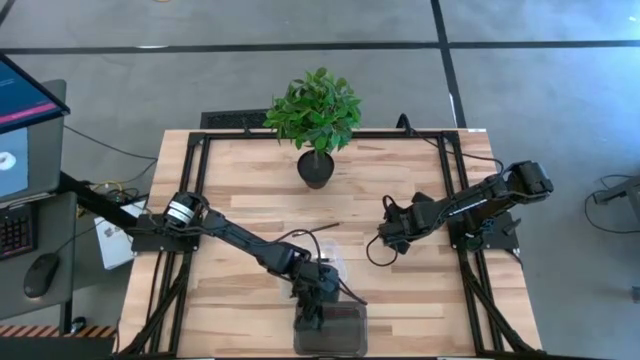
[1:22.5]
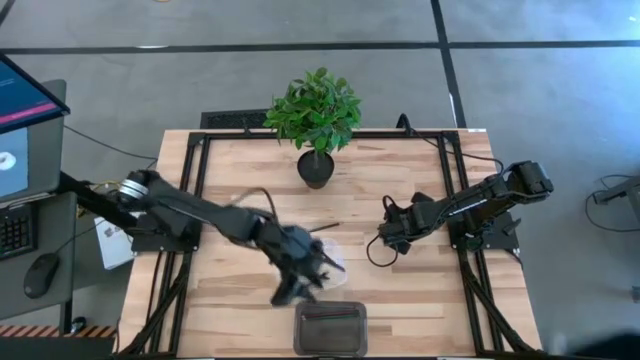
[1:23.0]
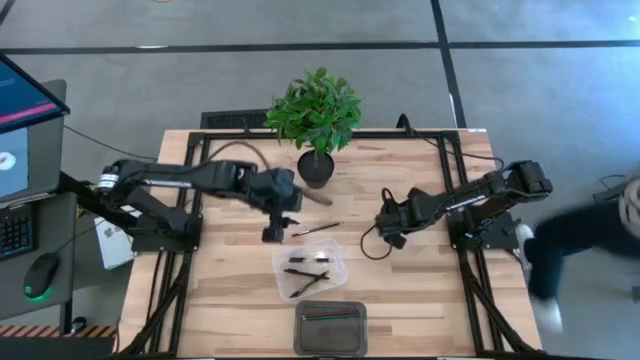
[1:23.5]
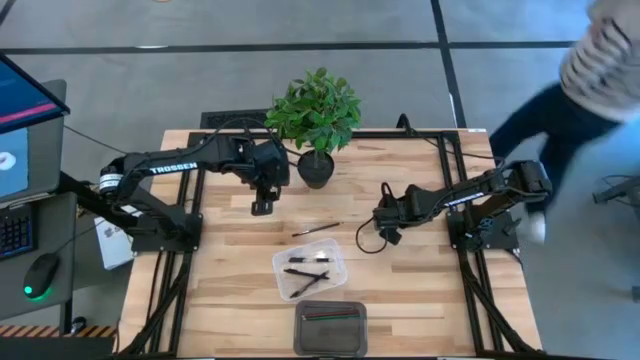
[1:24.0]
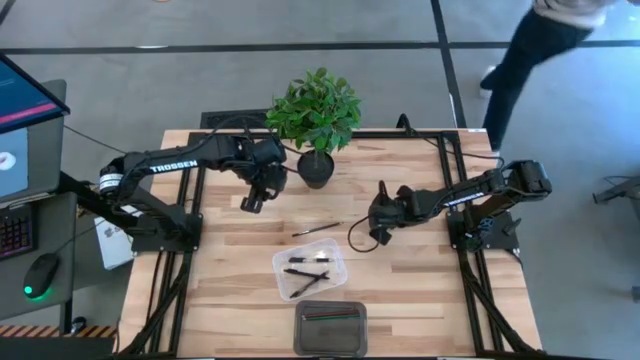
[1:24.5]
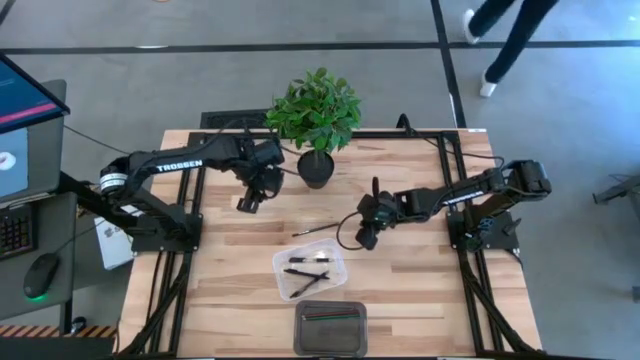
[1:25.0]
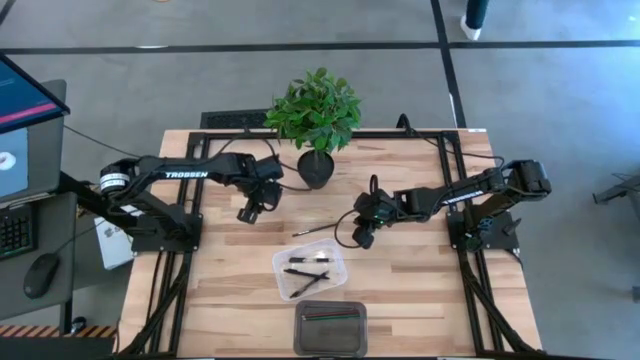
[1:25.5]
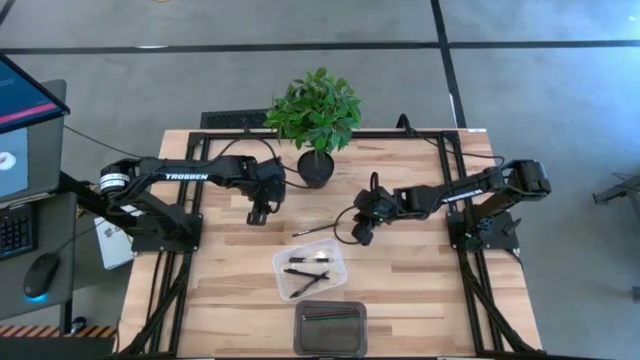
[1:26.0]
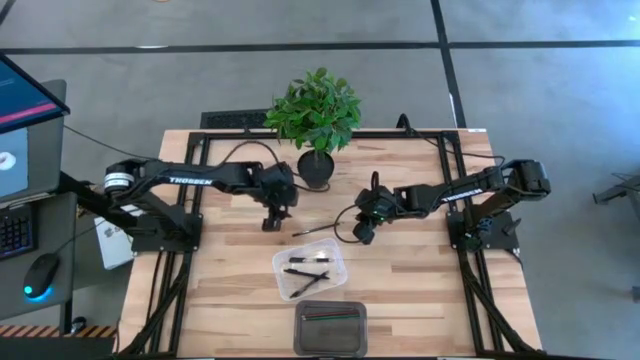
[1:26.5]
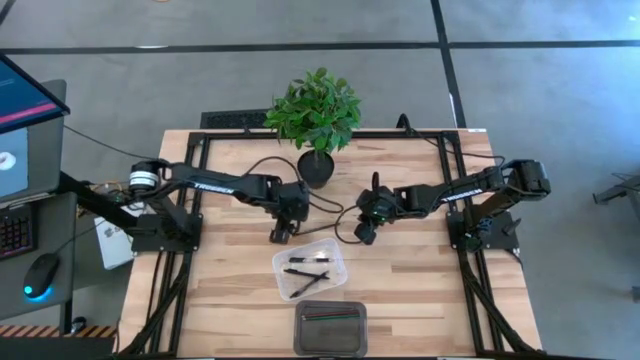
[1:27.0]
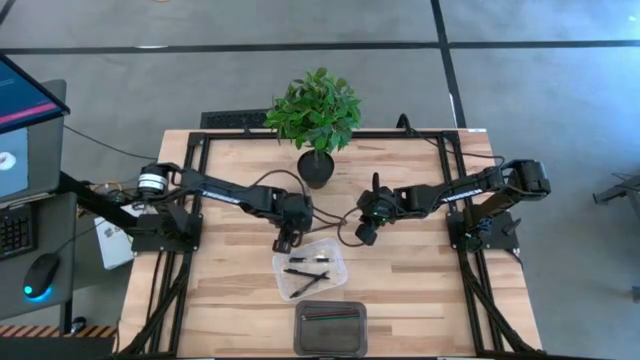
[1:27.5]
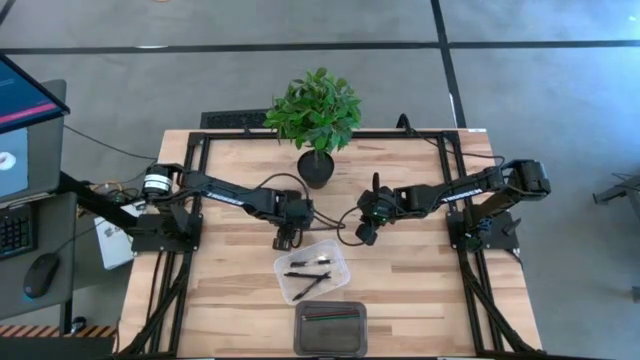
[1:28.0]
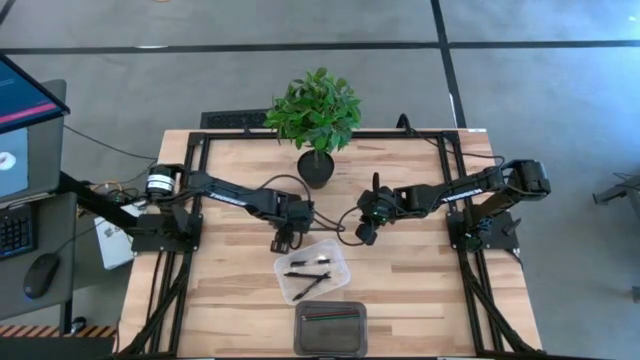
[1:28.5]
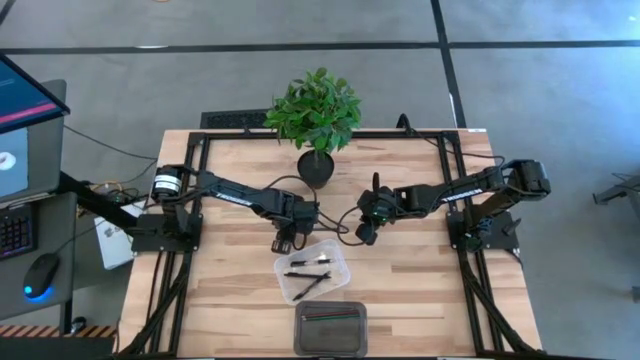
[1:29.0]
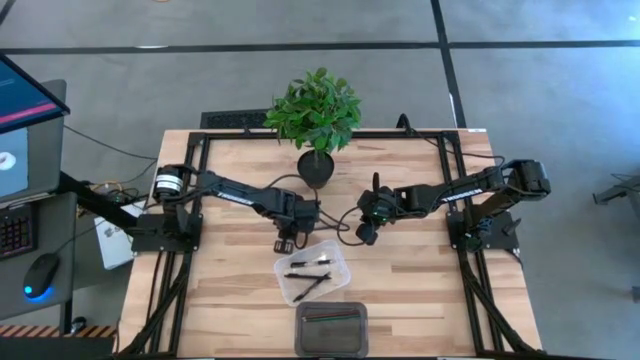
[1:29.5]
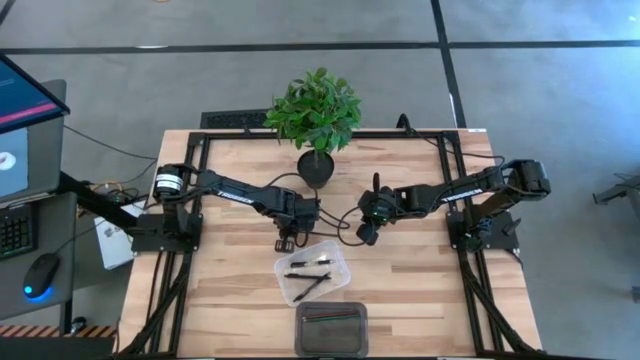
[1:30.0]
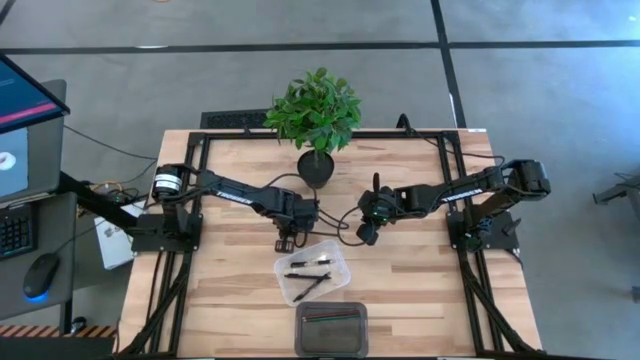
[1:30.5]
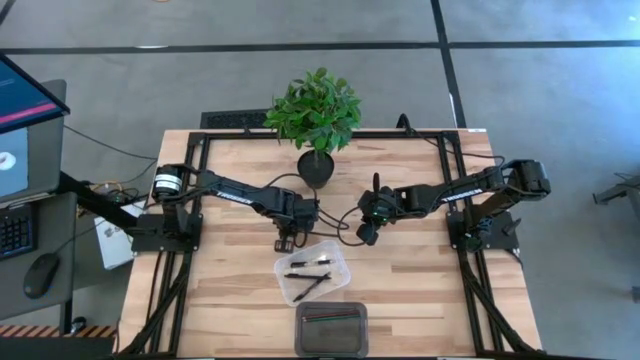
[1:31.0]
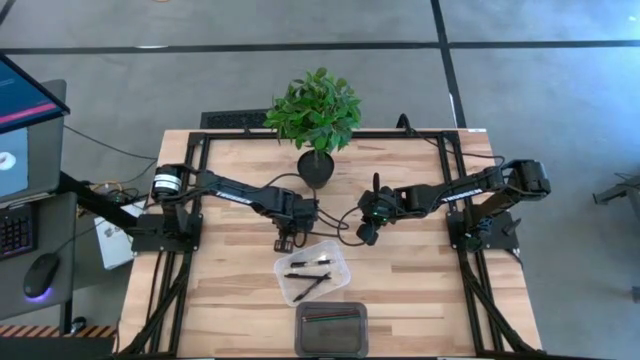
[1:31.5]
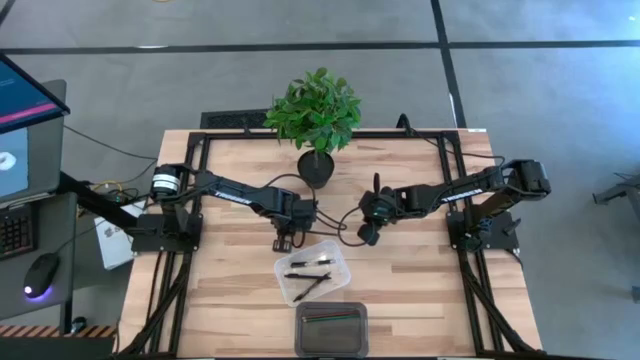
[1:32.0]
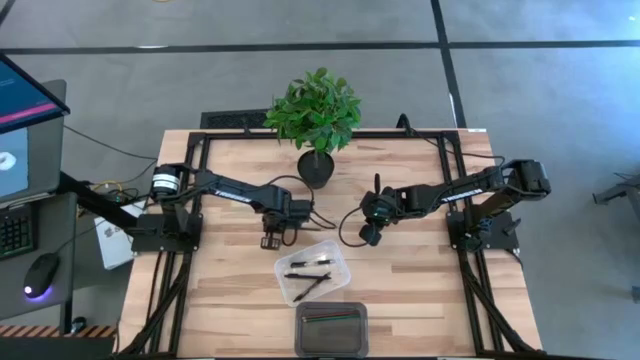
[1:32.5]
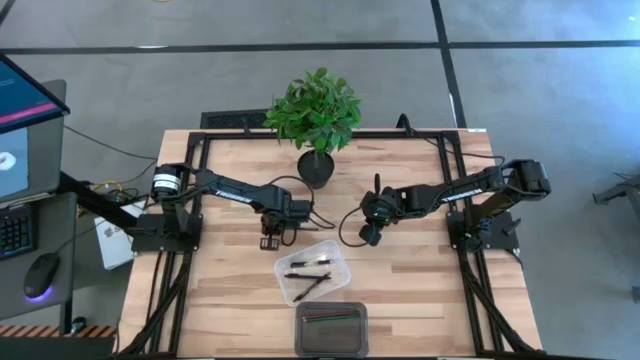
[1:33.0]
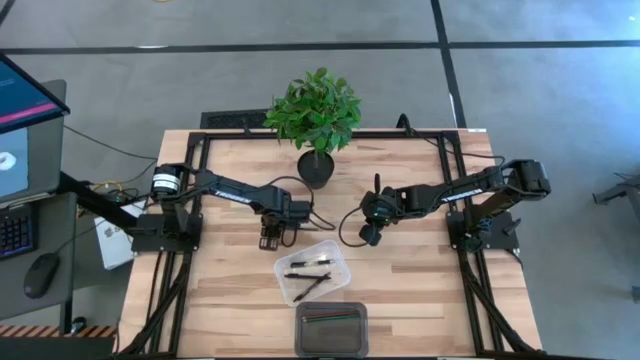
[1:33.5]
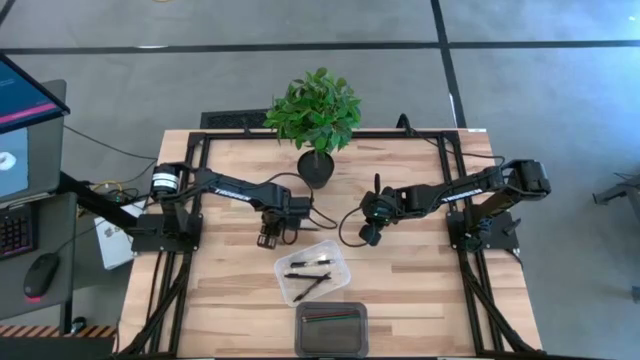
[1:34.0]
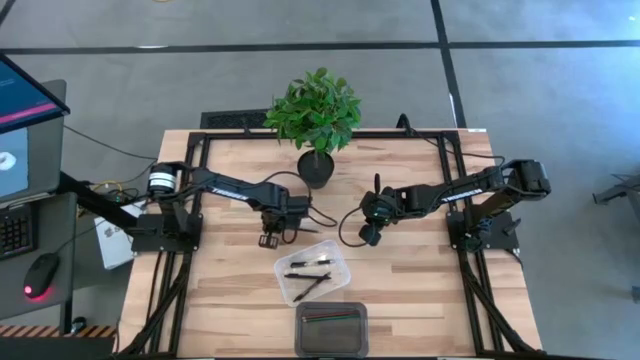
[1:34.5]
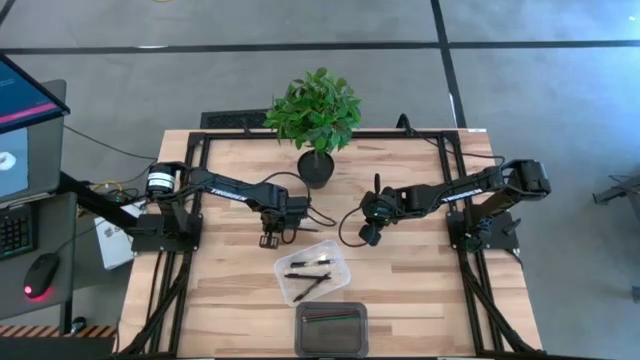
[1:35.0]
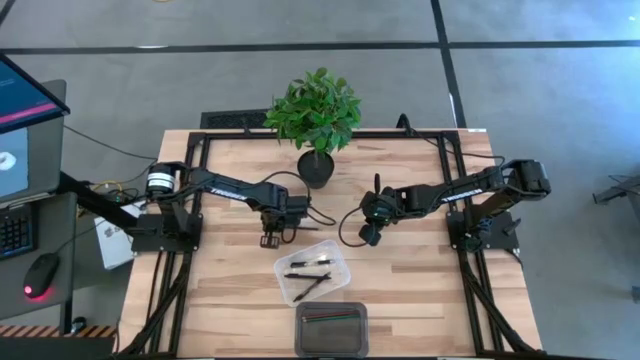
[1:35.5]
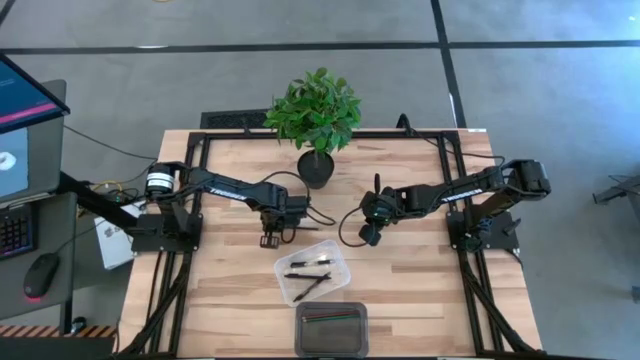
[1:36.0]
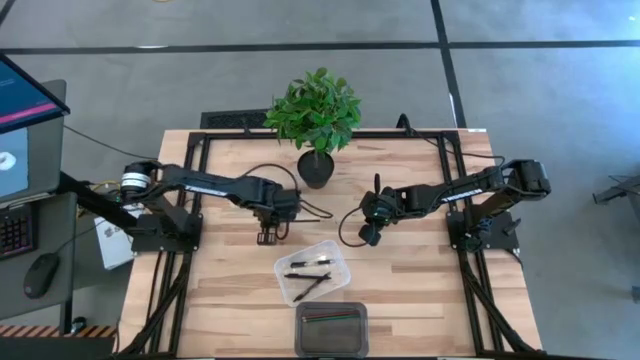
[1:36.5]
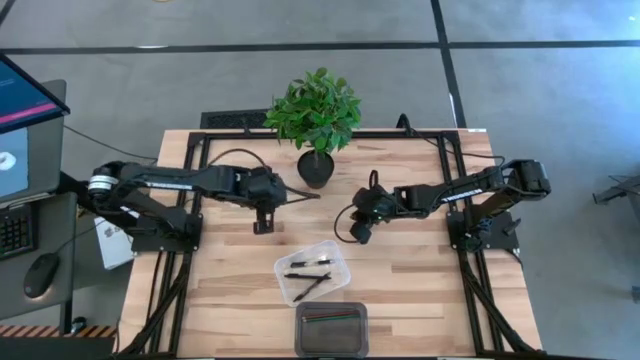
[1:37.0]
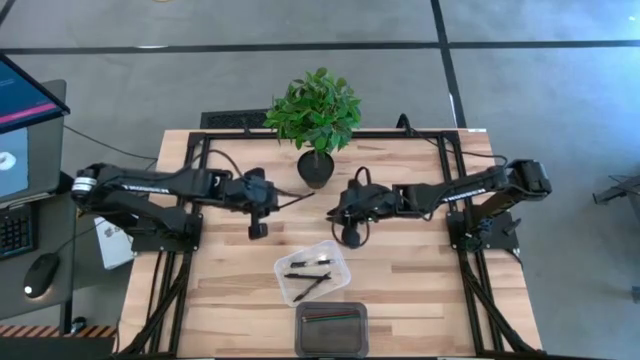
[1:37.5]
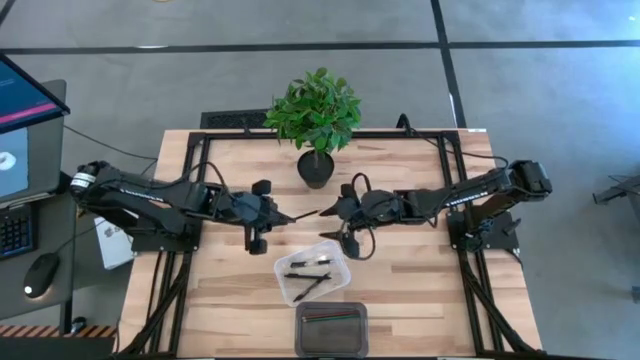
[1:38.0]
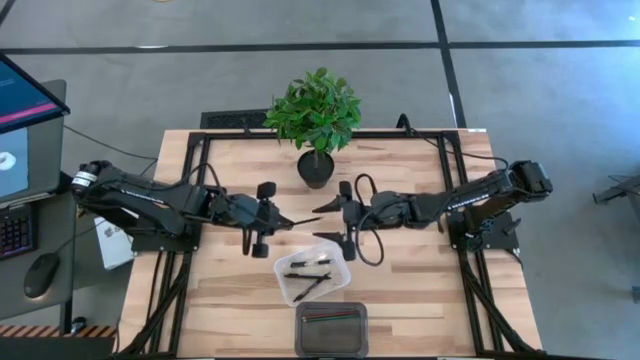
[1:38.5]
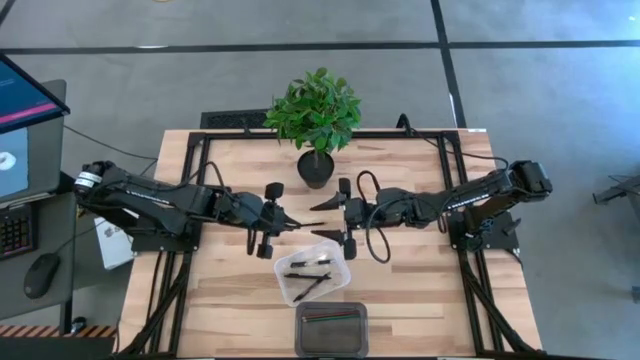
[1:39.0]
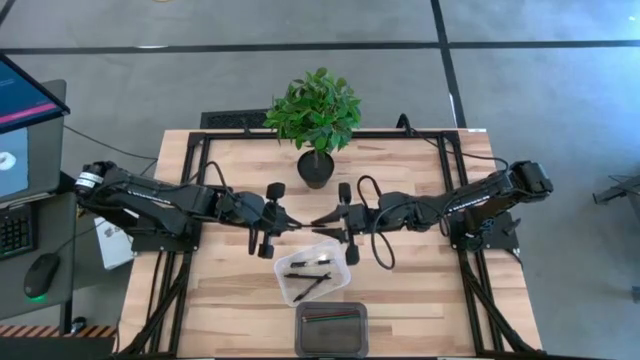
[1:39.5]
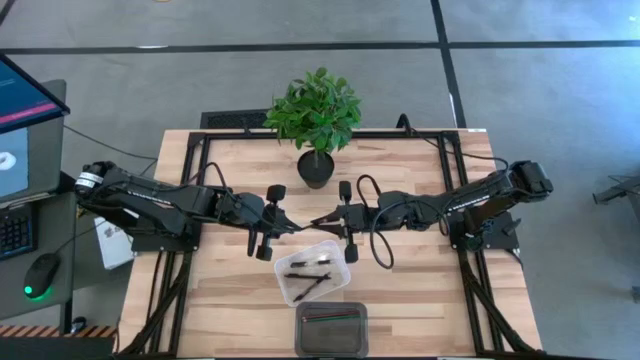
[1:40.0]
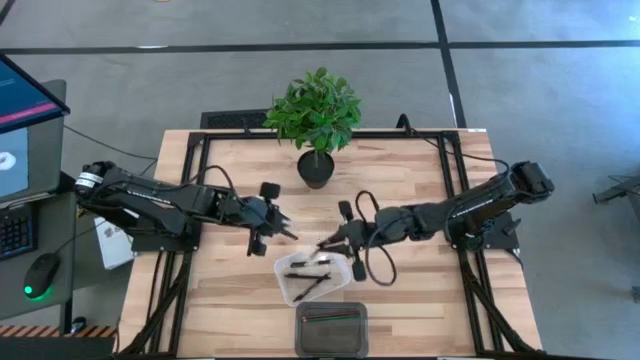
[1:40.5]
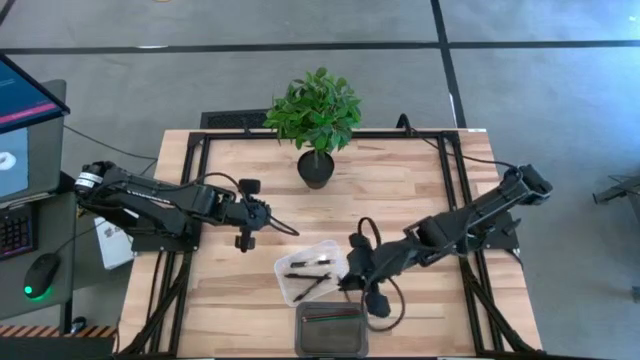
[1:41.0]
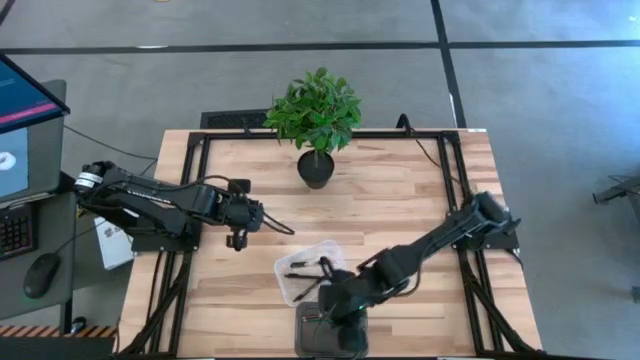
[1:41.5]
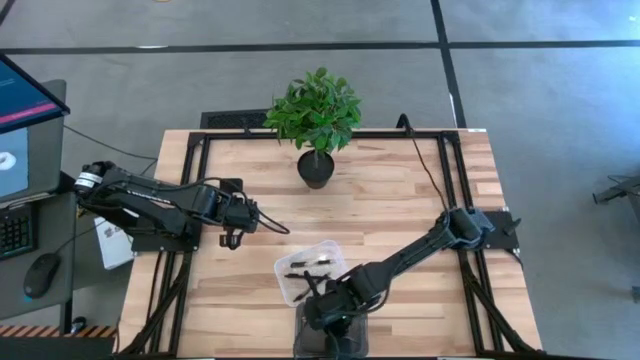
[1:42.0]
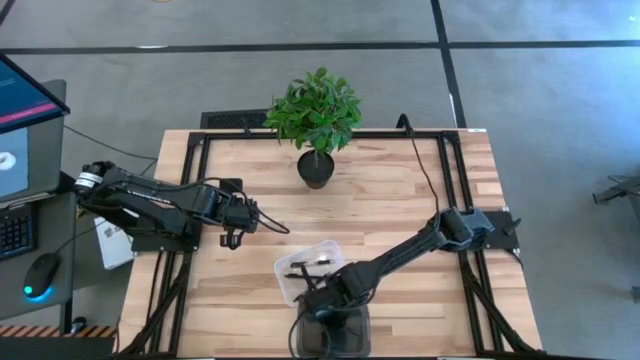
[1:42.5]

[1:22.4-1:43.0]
Task: Sort pens & pencils
Put the black pencil into the black bin
